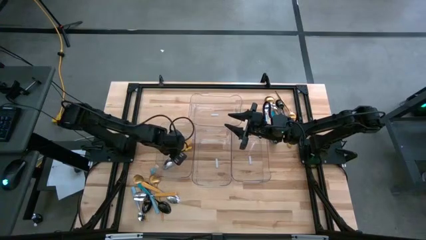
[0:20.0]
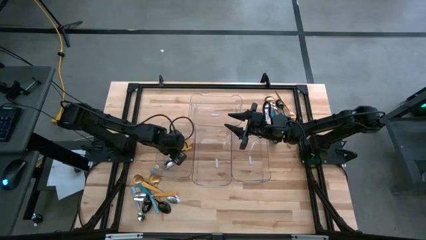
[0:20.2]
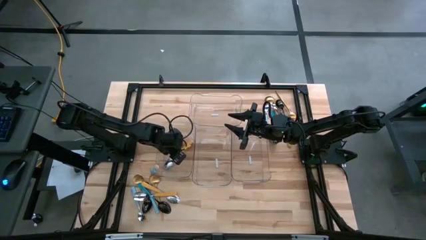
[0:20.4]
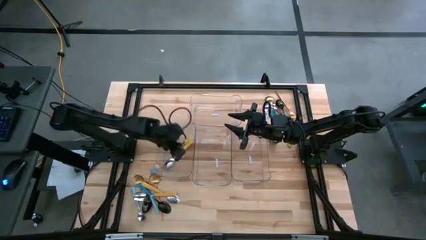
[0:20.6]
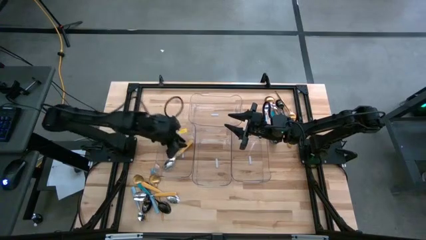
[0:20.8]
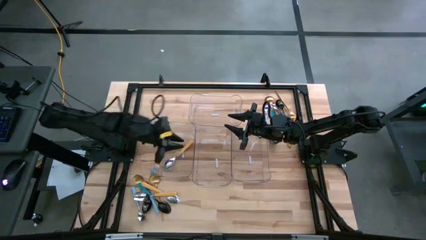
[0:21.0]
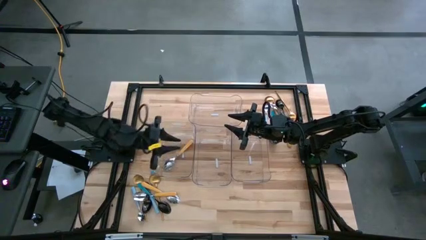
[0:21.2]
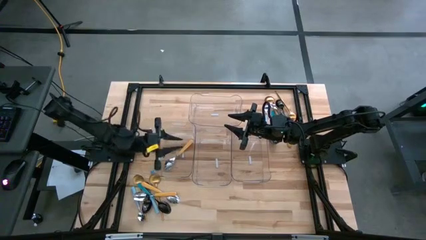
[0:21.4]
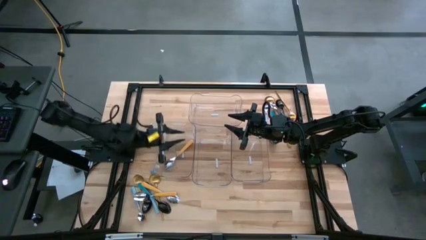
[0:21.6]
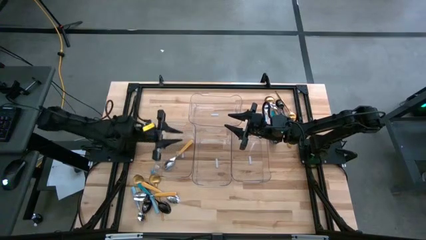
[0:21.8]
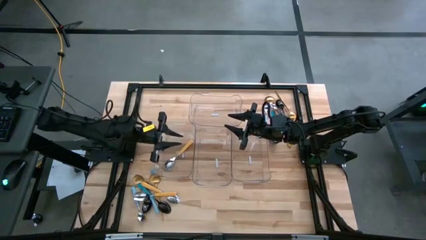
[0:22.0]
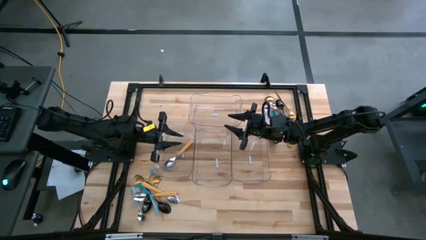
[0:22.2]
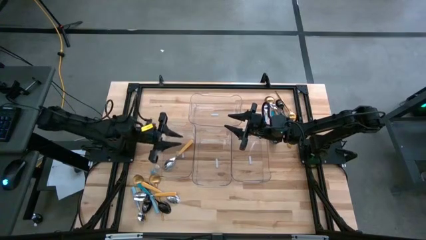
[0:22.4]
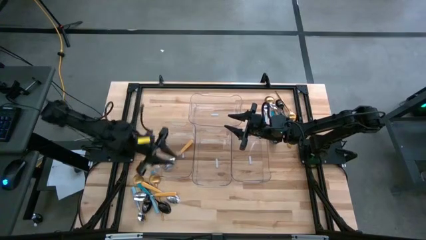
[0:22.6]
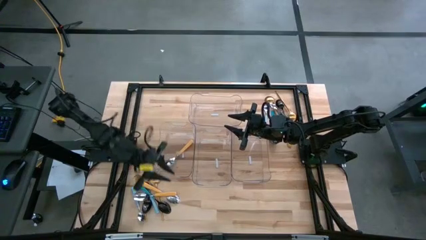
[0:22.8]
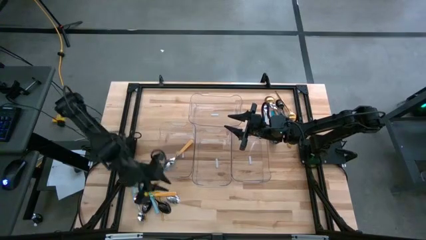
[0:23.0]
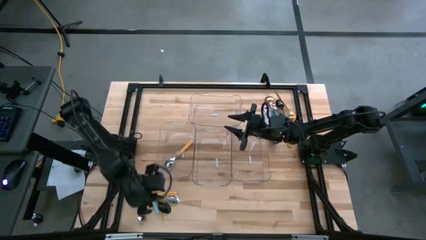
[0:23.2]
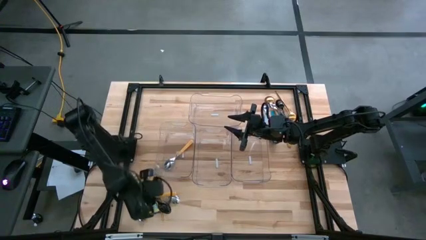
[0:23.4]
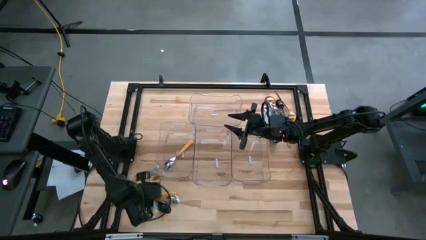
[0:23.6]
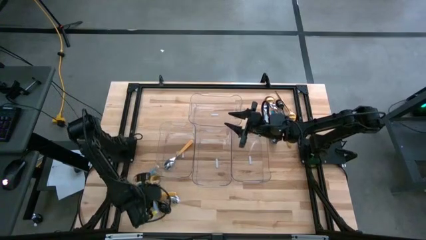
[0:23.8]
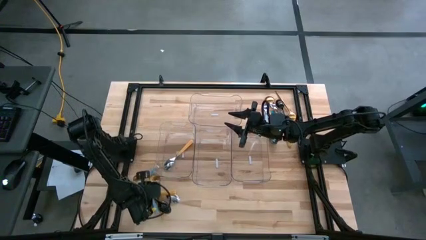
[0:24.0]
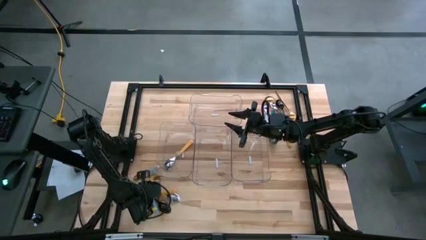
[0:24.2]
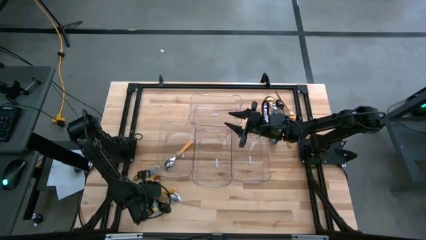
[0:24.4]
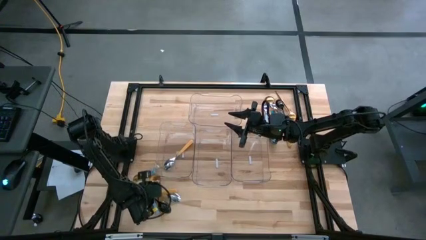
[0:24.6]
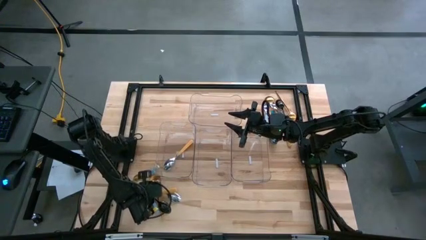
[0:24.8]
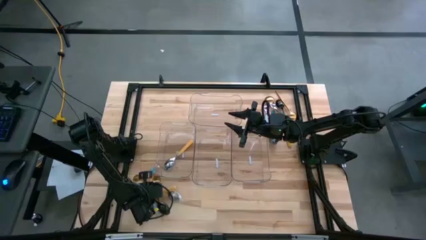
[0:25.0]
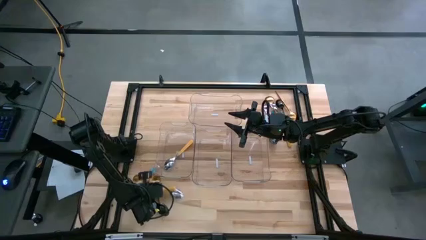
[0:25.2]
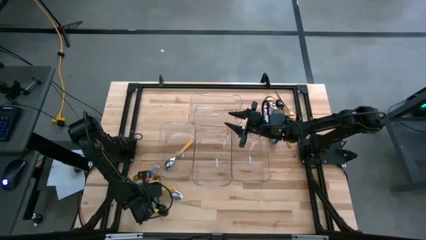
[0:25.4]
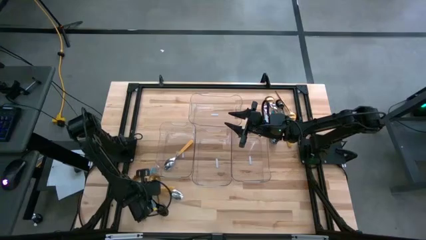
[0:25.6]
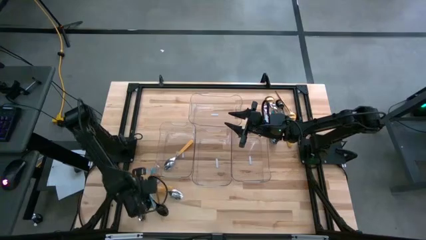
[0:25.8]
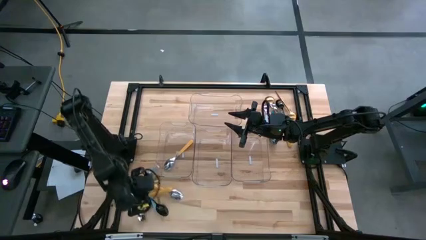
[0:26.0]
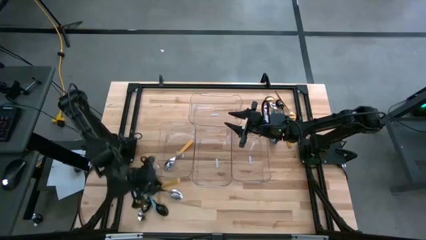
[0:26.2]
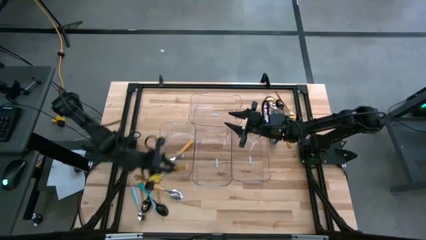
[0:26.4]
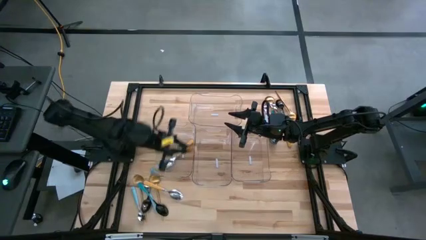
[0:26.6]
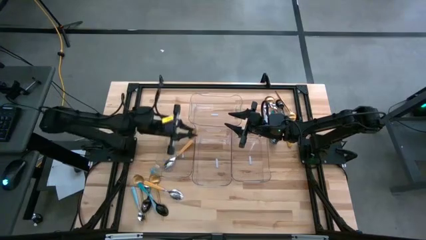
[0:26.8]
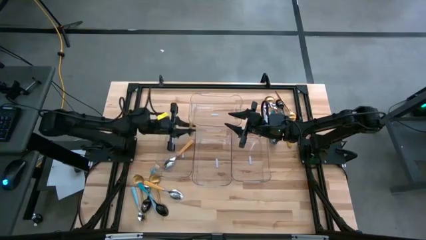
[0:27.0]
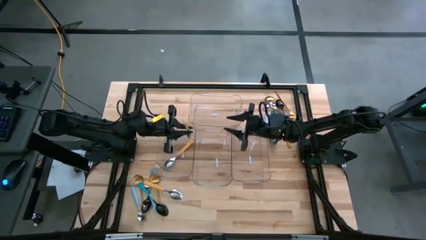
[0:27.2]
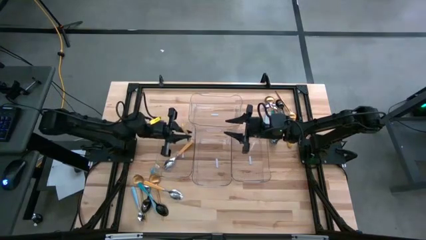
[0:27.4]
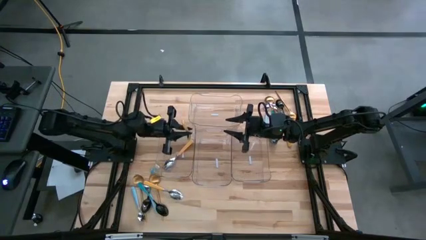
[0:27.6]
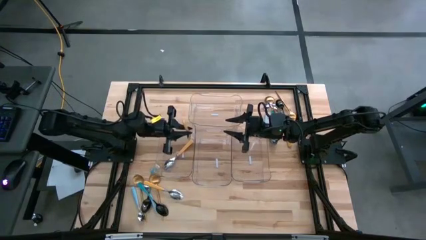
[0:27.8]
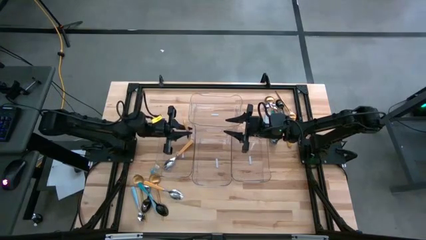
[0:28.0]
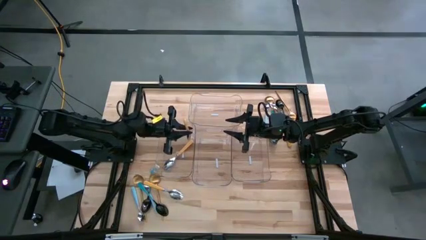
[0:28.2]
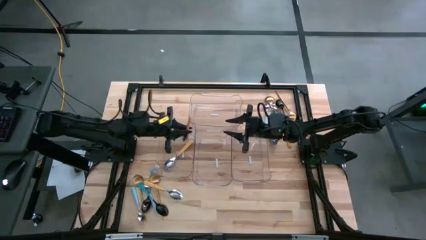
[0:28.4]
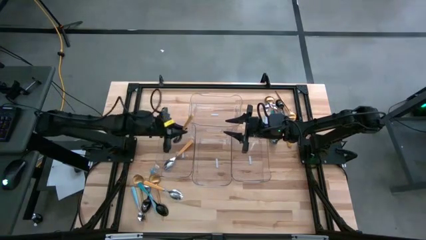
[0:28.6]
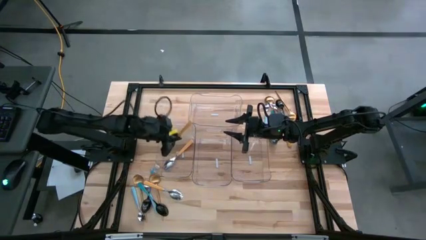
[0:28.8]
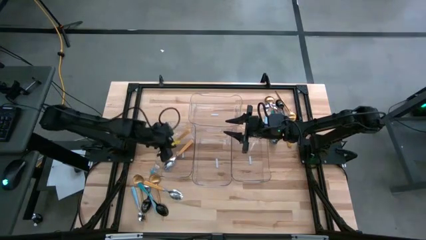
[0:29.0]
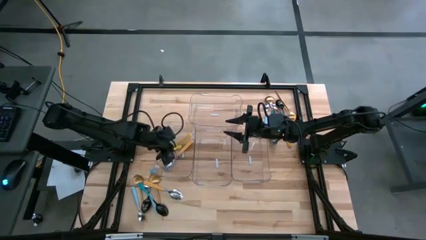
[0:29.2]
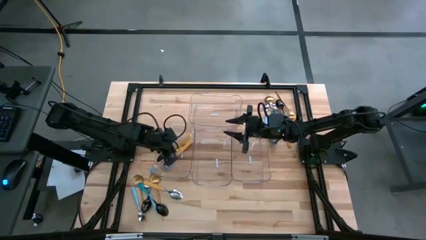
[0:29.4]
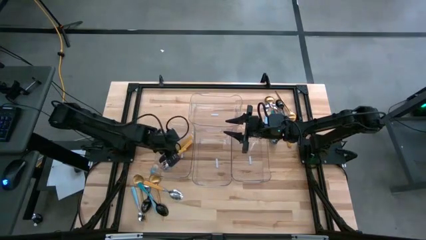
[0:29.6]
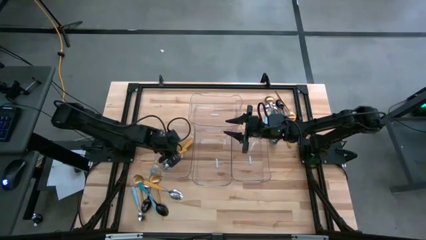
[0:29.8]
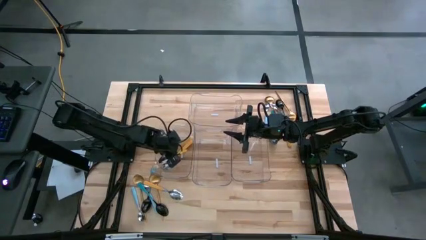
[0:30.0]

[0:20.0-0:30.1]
Task: Sort silverware by color (type)
Put the yellow spoon into the left transparent bin

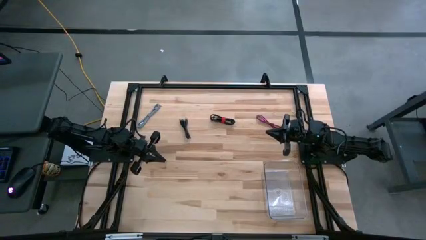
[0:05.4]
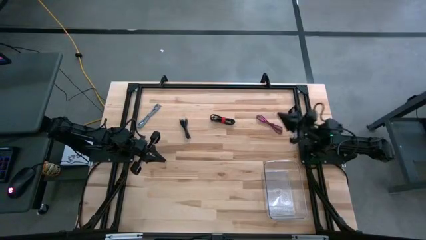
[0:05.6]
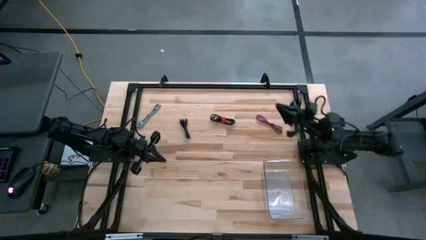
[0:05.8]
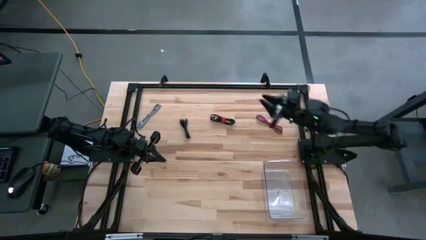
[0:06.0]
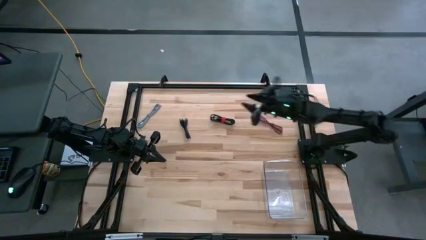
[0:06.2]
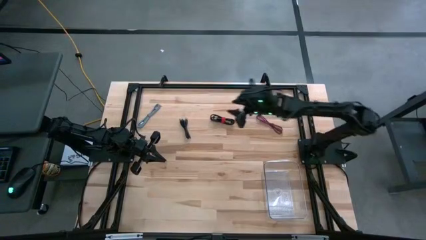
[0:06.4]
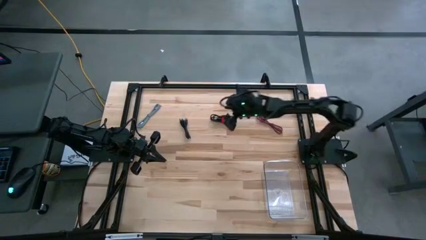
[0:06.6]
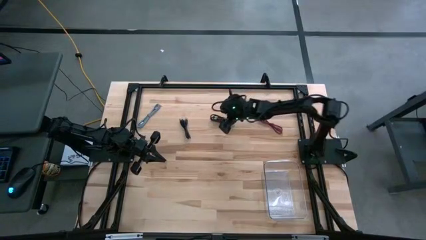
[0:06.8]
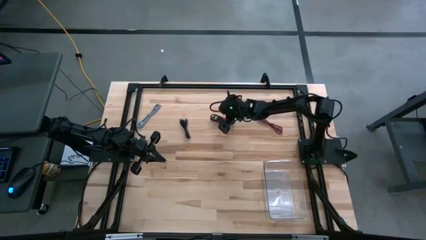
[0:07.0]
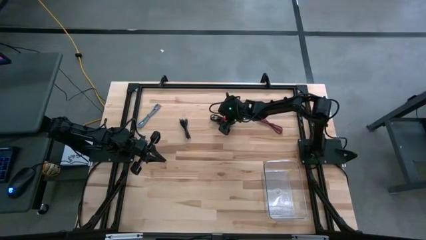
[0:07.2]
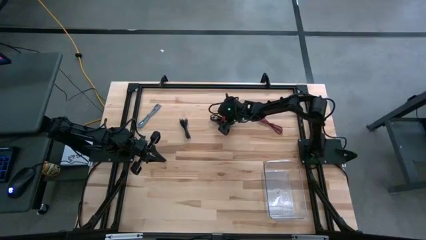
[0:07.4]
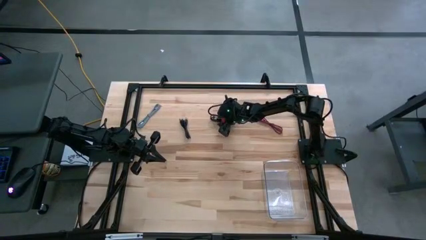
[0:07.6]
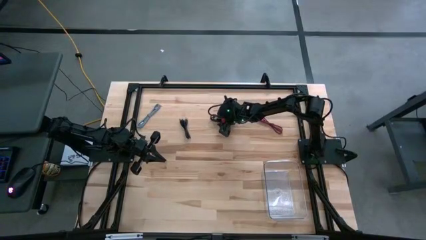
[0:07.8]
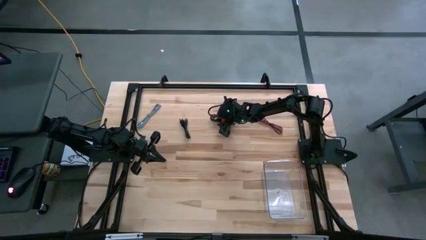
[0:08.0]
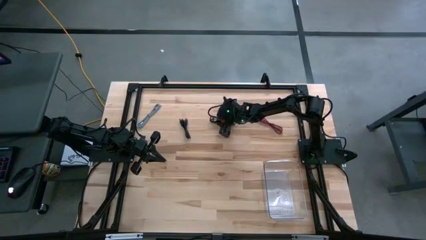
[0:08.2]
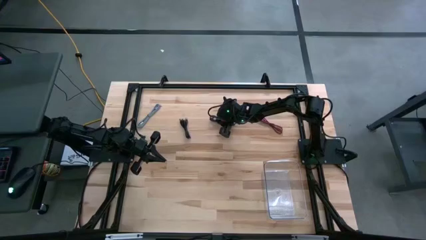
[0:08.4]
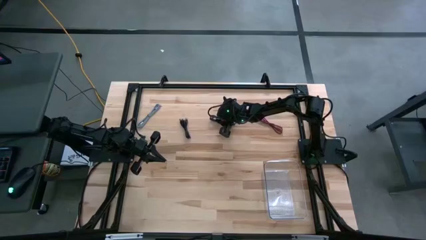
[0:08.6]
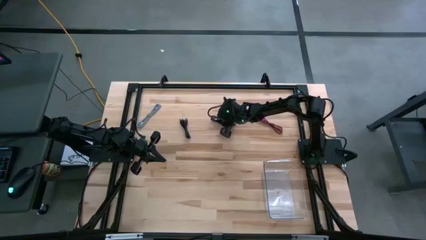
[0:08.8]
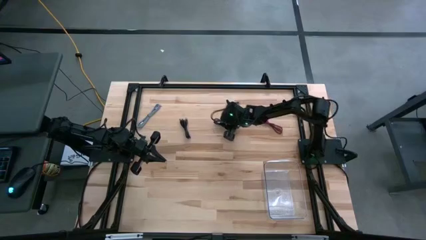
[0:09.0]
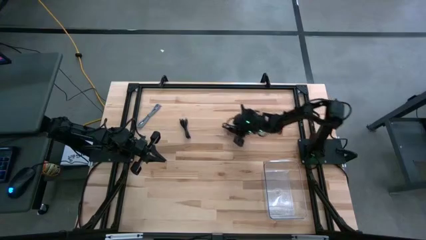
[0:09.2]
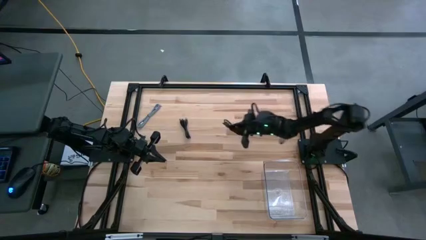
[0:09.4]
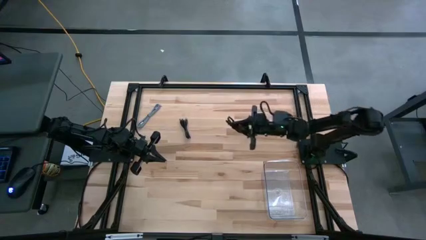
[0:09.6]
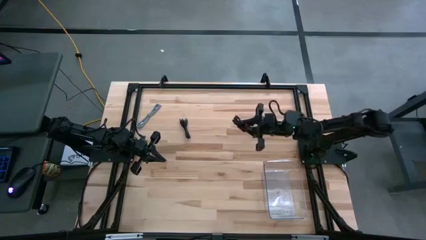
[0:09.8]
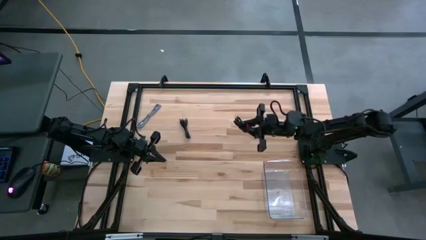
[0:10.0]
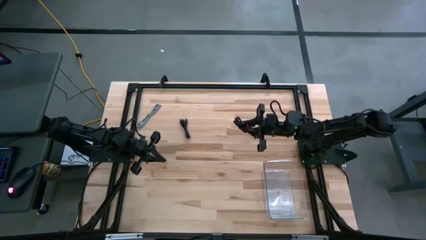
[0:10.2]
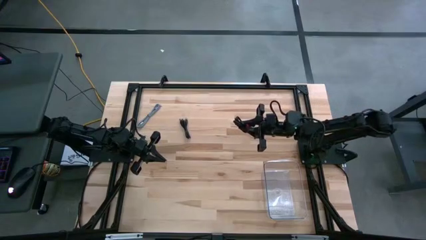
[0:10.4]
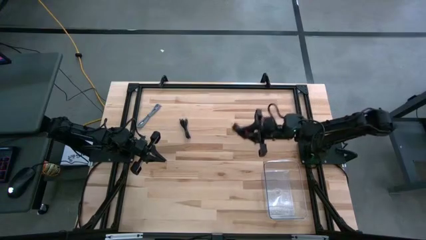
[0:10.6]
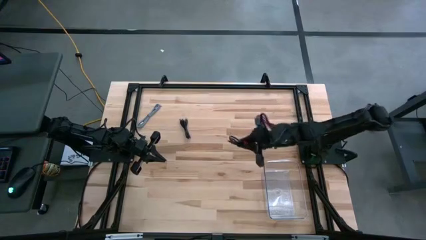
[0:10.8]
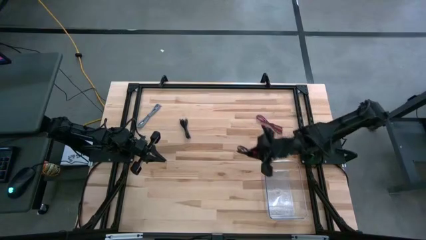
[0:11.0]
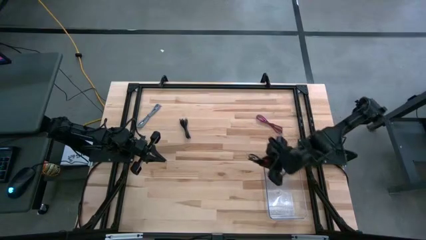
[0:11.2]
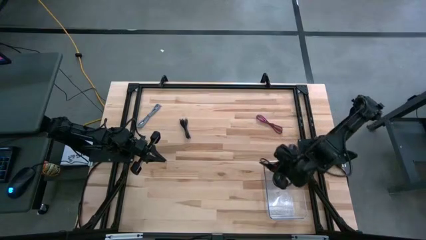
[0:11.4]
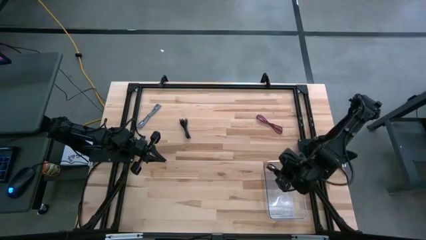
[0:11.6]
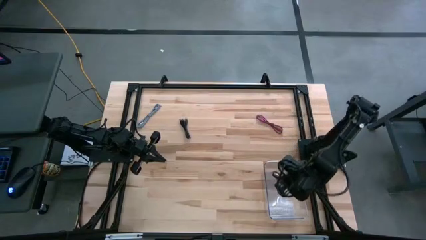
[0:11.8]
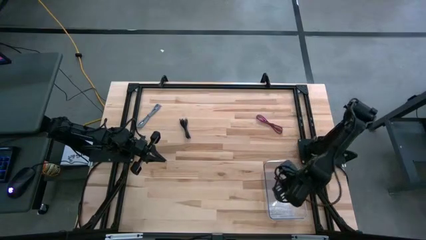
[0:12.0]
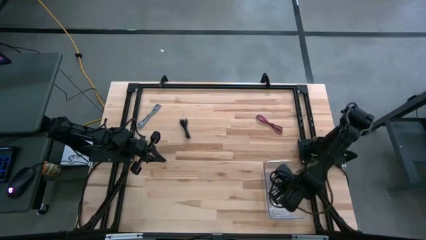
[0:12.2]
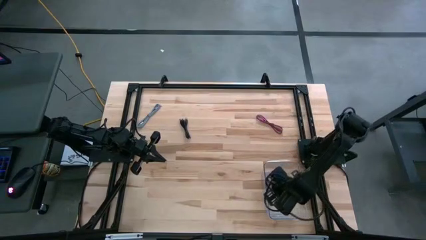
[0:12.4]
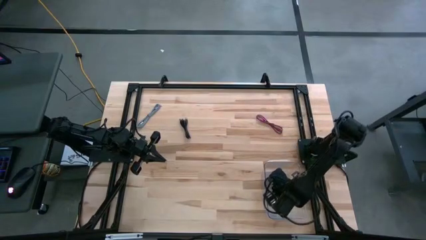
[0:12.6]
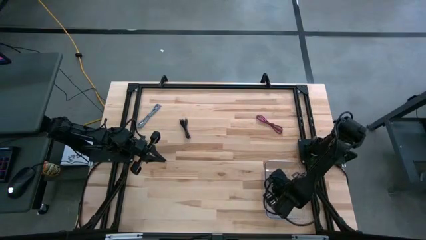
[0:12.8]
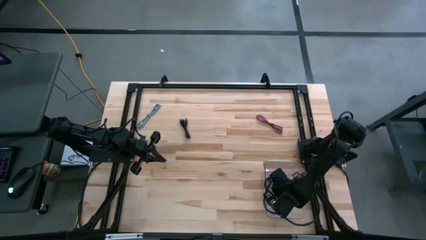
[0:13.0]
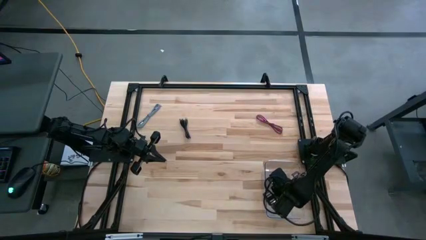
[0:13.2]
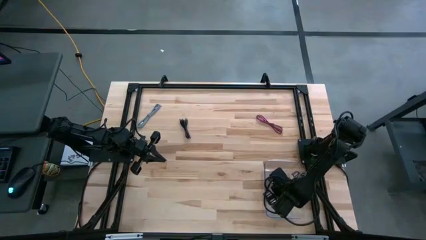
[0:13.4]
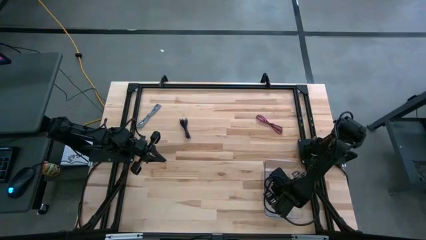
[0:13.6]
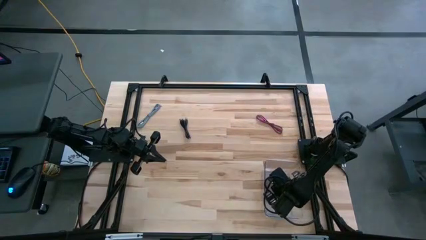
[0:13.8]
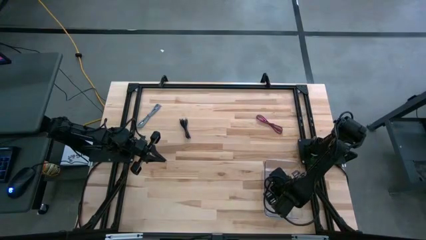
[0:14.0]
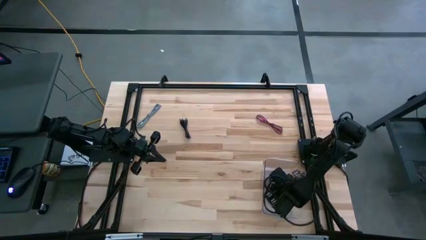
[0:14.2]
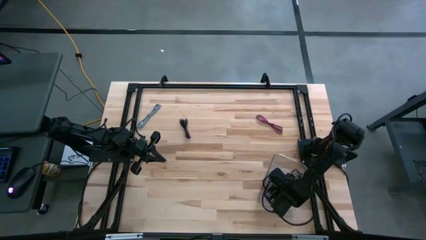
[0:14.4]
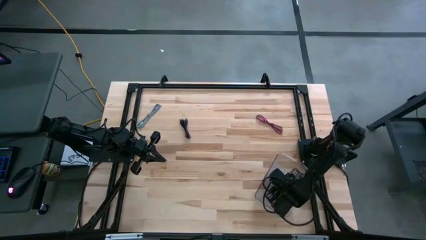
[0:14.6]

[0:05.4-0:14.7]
Task: Pick and place USB-C Cables
Put the right black charger cable into the transparent bin
